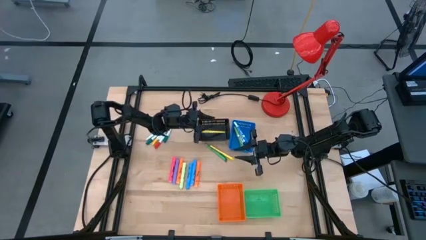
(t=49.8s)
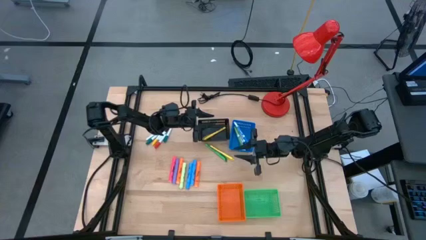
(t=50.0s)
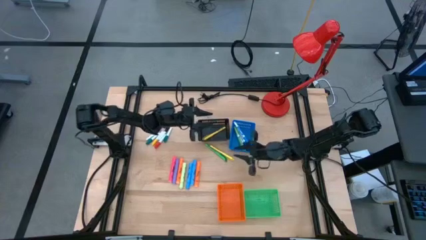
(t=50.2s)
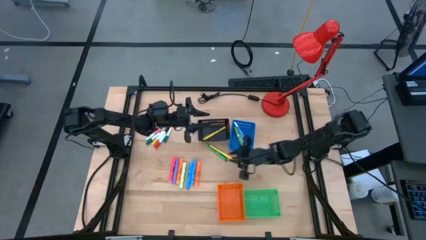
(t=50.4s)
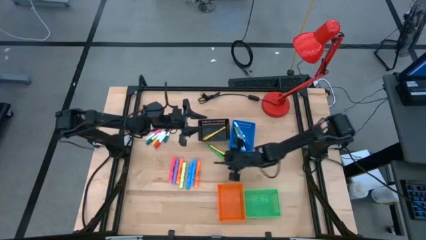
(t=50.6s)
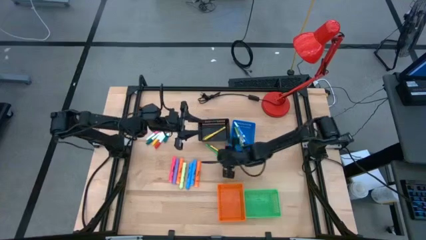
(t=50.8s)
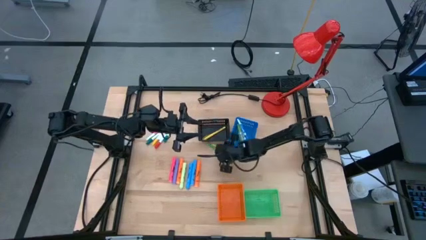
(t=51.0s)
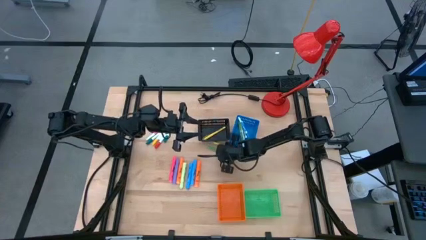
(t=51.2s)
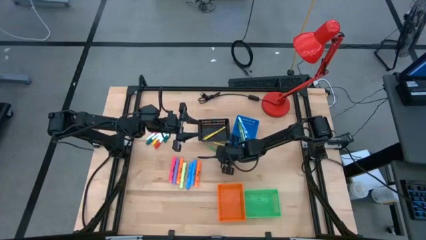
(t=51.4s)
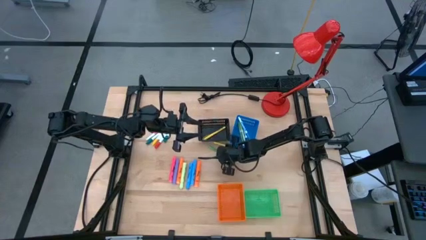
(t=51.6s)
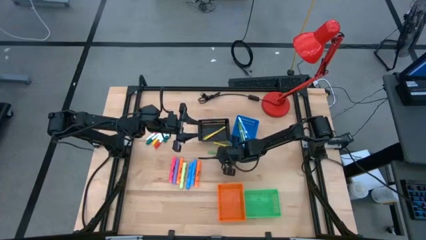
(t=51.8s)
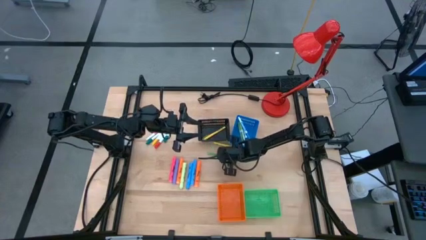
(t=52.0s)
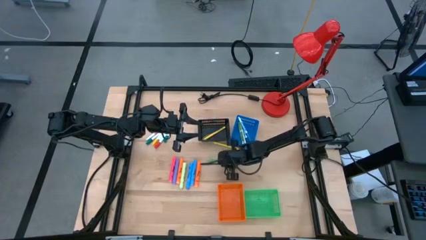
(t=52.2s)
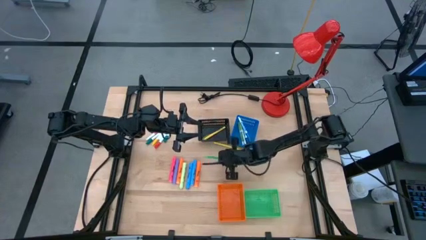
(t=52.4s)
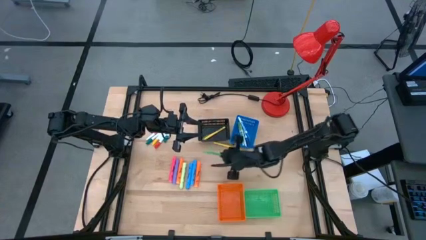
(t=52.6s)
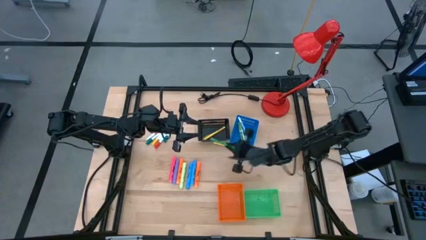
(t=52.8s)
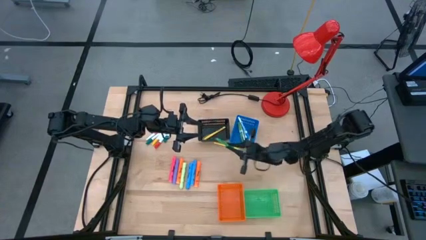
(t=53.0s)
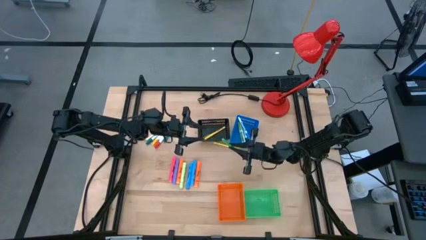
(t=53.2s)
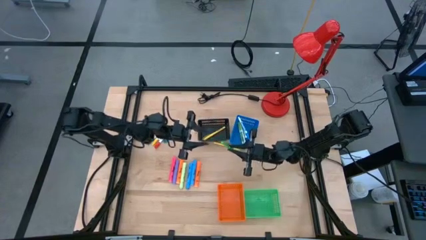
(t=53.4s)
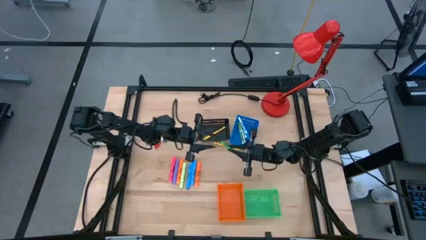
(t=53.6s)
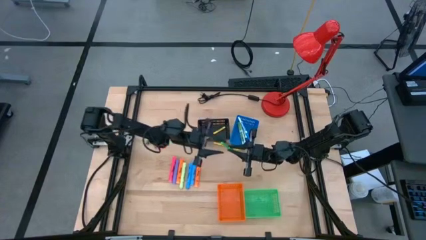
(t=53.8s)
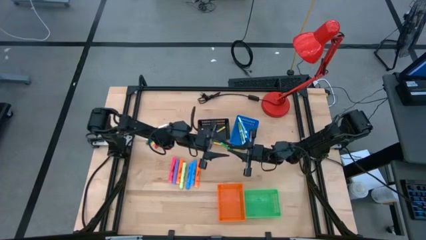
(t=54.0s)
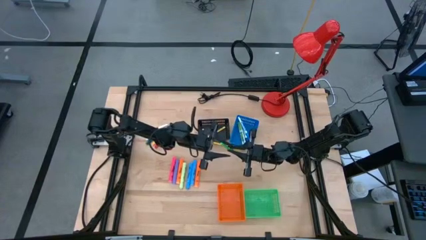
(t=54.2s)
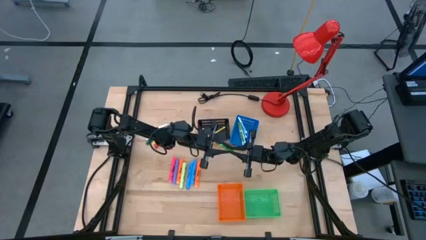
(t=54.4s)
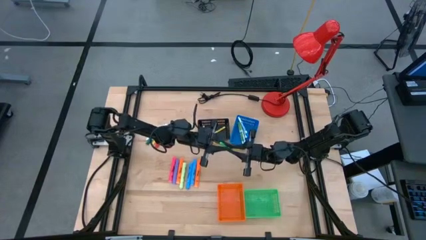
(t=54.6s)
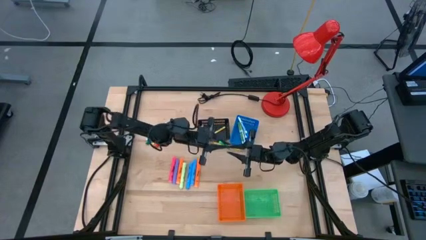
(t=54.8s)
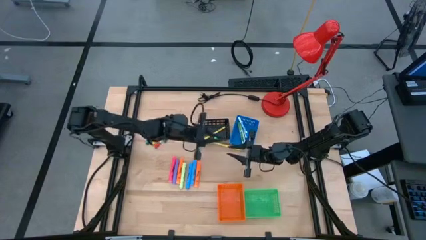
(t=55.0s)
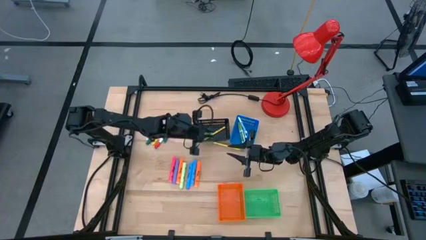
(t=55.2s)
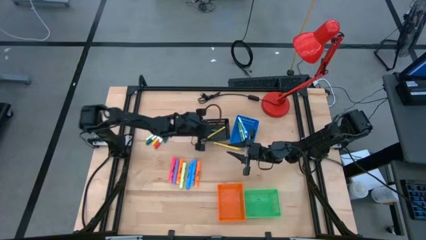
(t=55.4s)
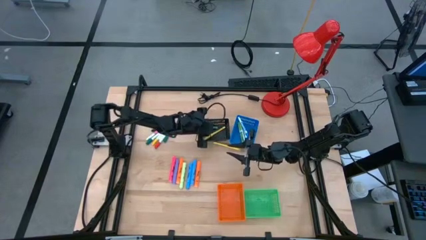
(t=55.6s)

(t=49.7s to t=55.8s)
Task: Pick & Place Markers
Put the green pen into the black bin

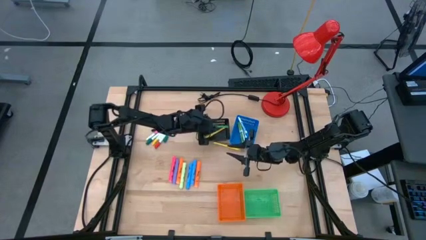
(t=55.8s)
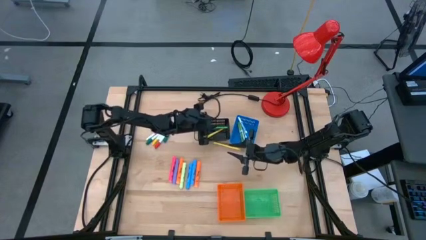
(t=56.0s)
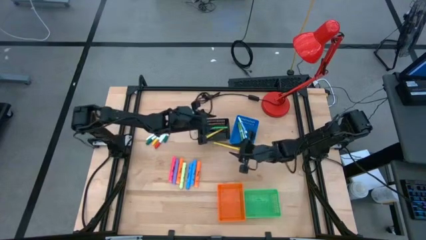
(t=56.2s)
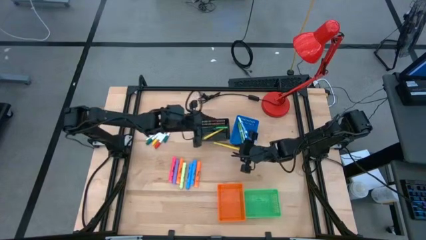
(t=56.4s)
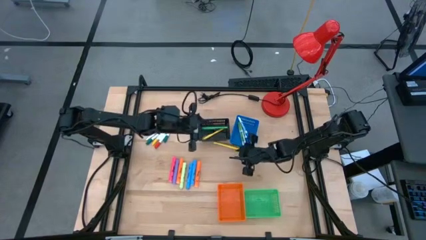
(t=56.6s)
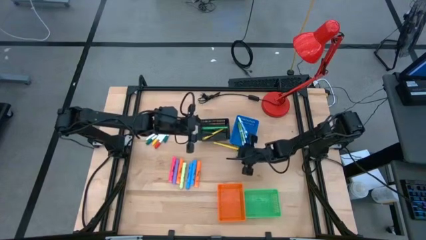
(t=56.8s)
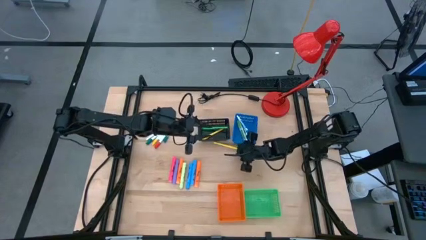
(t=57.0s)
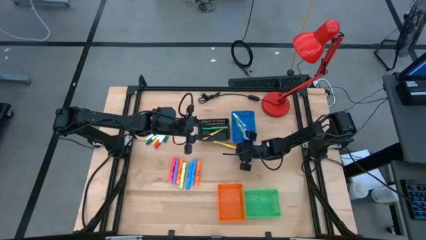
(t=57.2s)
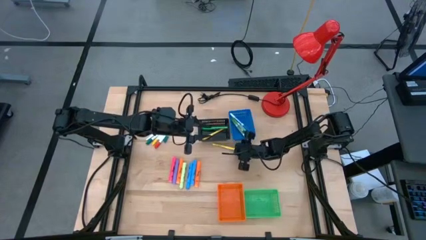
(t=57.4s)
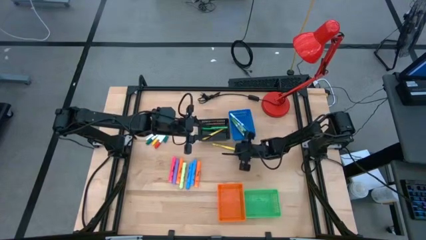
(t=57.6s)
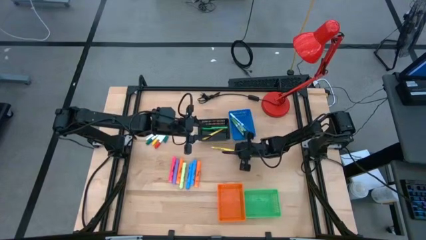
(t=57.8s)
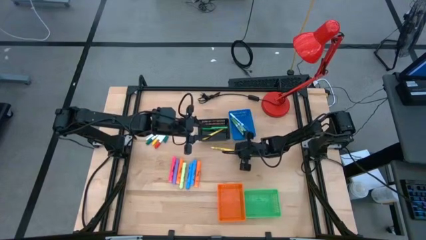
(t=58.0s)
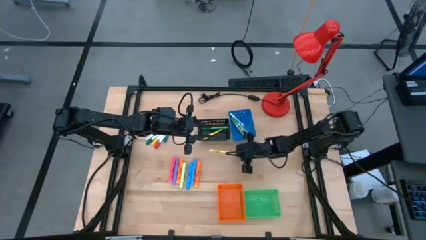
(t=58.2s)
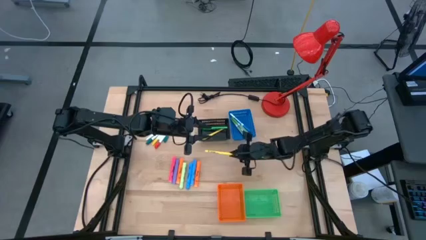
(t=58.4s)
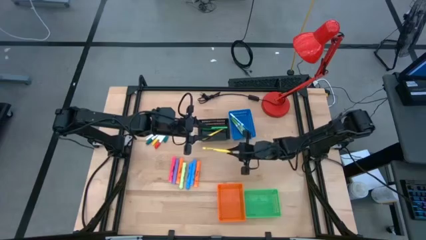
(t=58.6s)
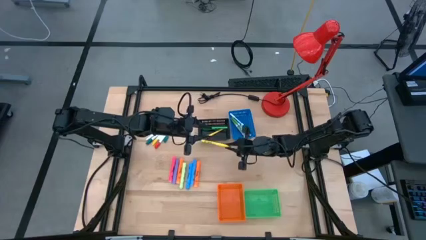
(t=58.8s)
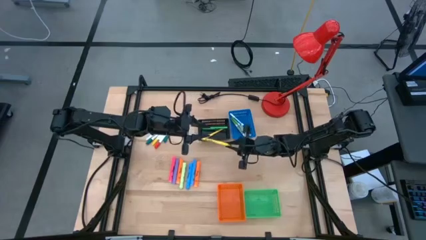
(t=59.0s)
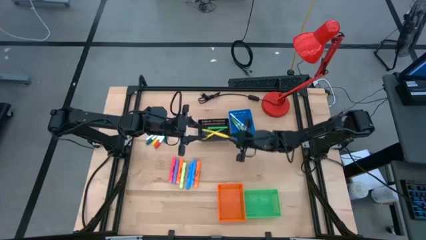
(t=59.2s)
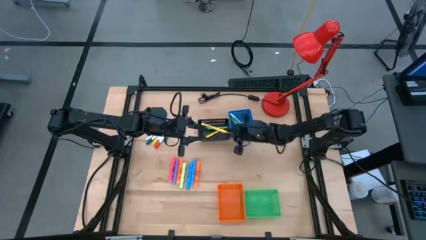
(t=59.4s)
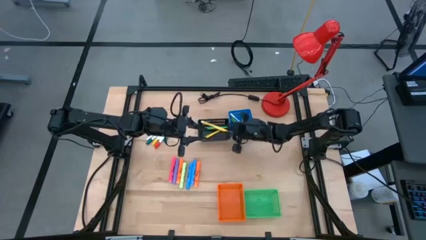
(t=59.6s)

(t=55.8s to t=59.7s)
Put the yellow pen into the black bin

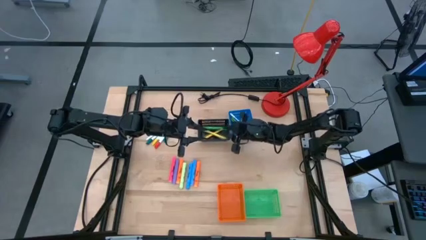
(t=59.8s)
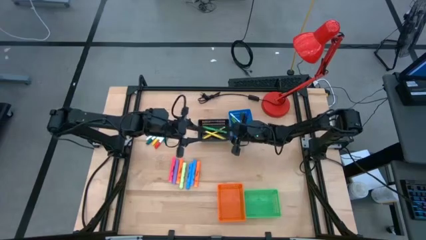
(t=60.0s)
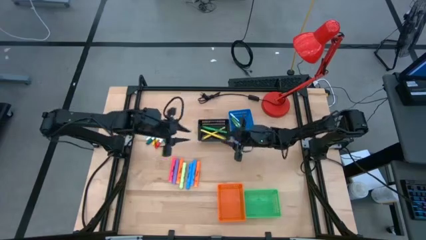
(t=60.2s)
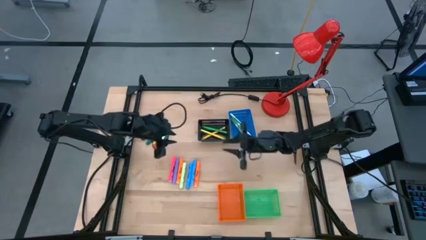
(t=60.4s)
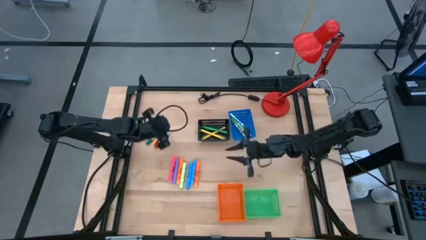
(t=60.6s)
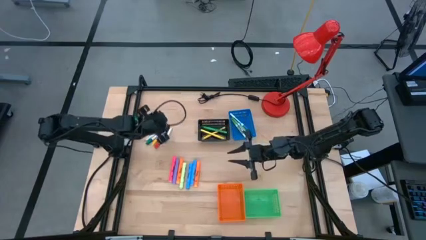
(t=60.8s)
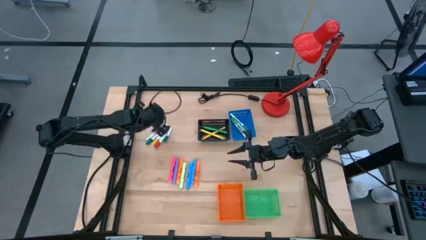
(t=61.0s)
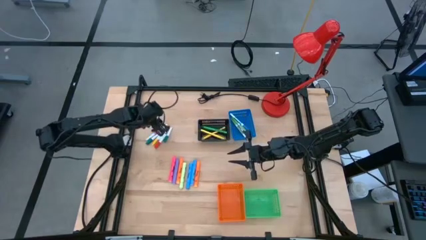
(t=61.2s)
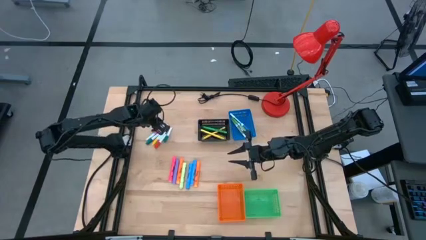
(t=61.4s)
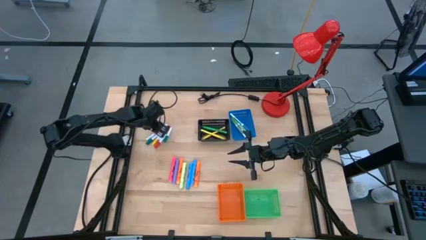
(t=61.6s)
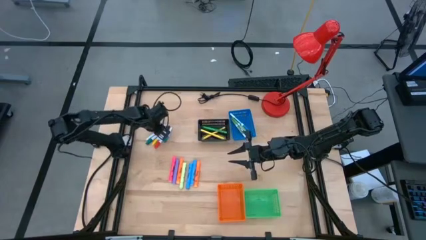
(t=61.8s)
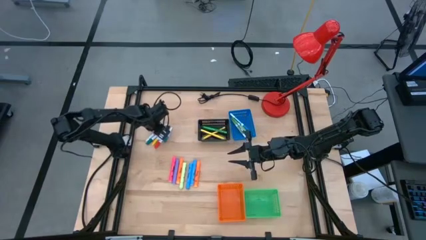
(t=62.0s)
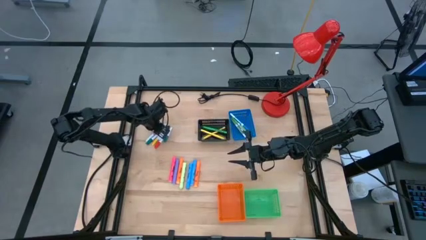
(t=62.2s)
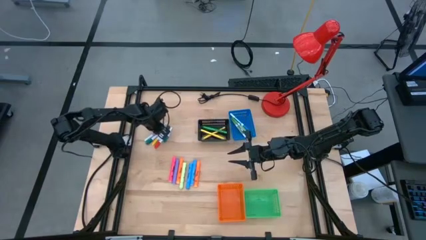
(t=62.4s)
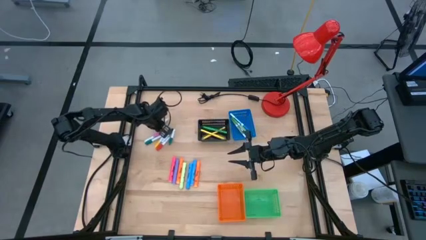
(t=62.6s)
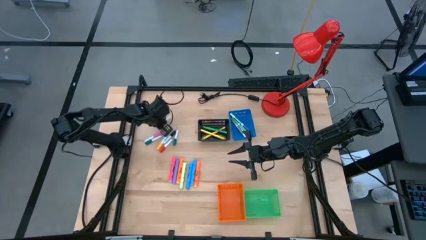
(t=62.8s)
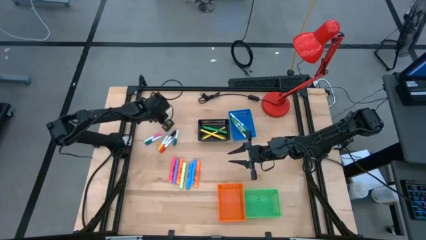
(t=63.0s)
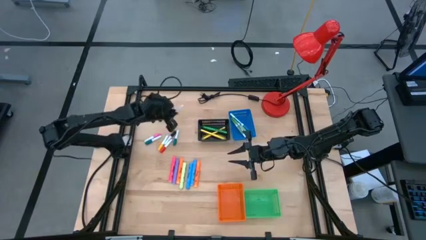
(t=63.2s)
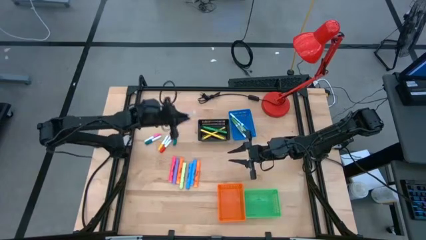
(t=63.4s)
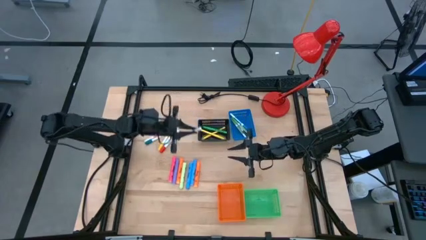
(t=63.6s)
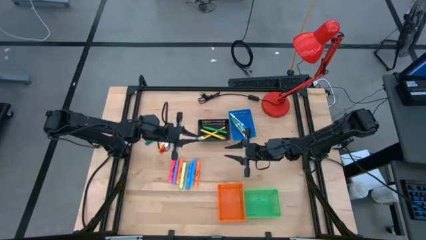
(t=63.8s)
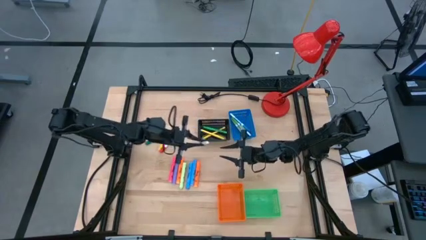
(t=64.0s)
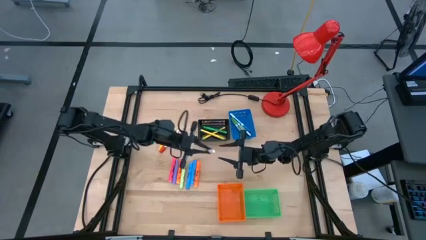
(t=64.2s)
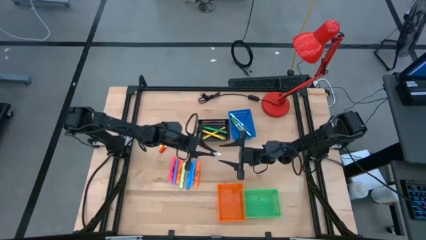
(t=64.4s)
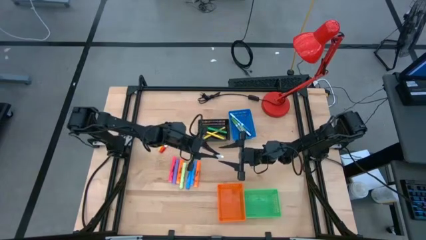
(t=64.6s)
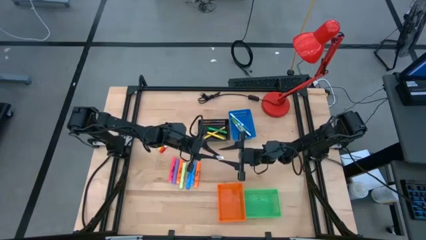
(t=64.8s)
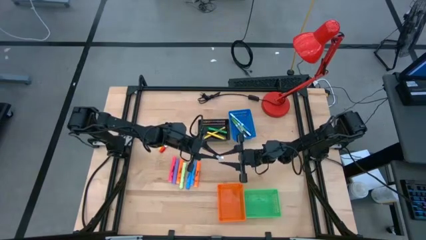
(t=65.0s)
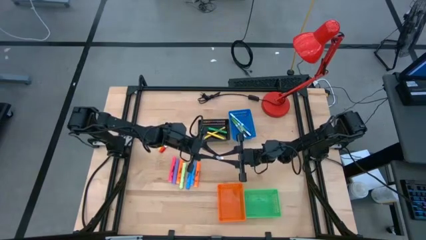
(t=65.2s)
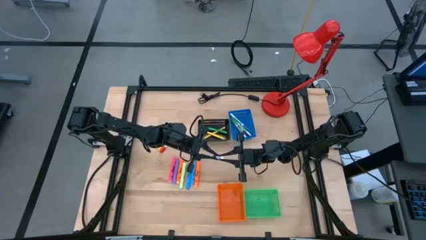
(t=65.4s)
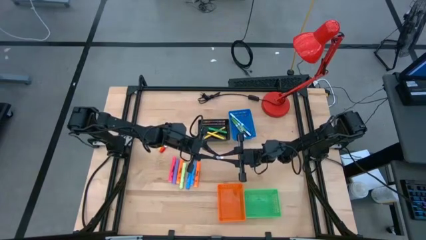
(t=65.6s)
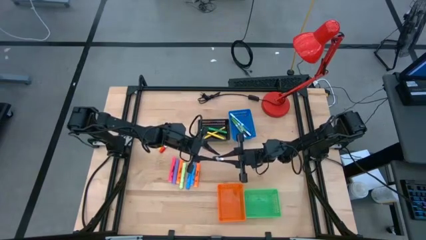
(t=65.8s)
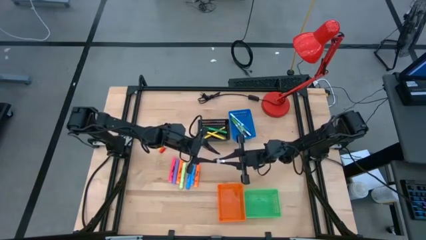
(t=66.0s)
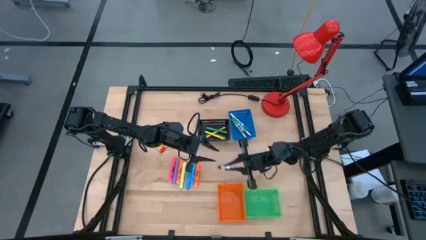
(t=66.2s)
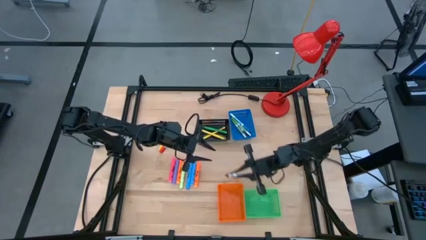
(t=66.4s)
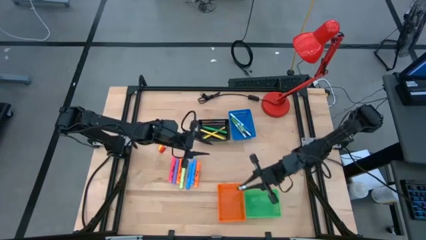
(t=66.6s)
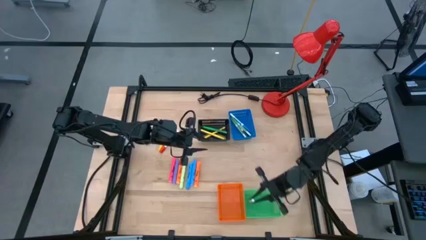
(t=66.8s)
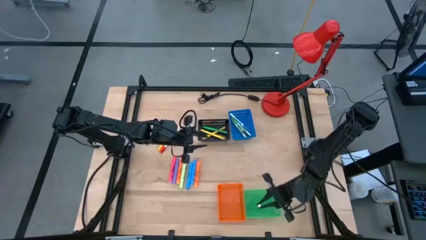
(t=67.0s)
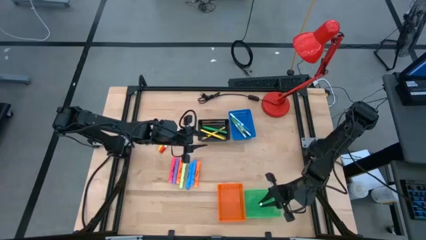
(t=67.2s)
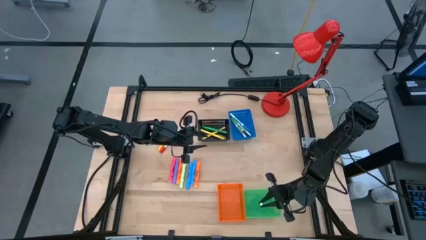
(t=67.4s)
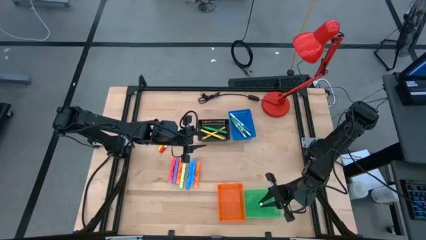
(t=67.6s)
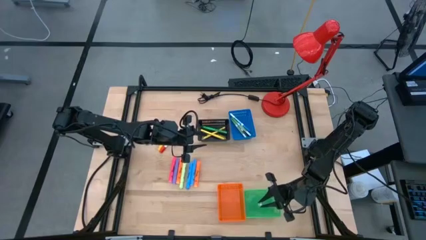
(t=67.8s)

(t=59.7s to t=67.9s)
Put the black highlighter pen into the green bin
